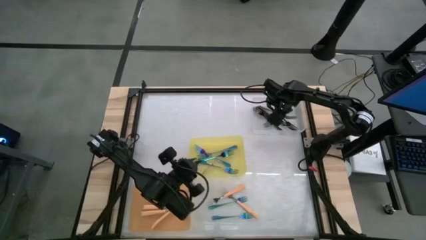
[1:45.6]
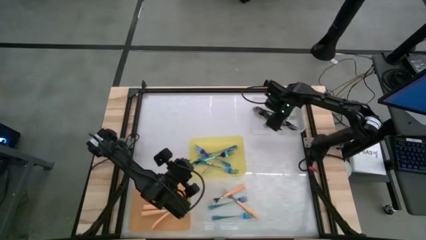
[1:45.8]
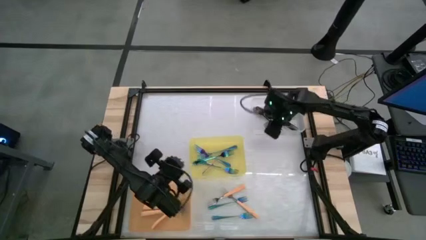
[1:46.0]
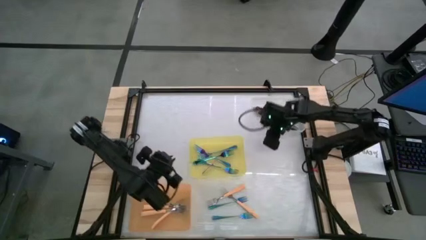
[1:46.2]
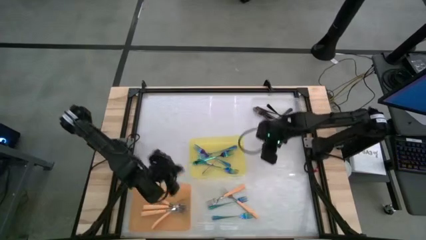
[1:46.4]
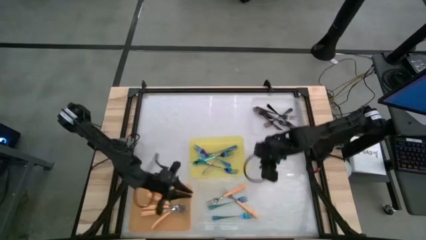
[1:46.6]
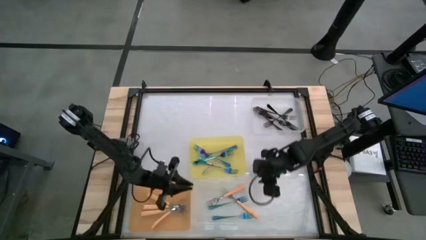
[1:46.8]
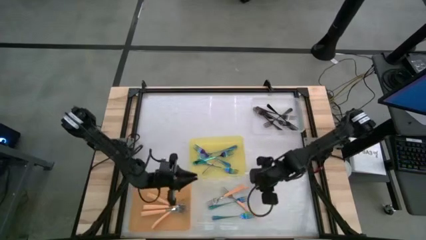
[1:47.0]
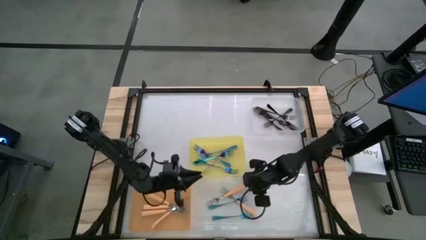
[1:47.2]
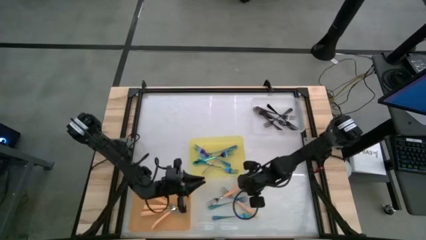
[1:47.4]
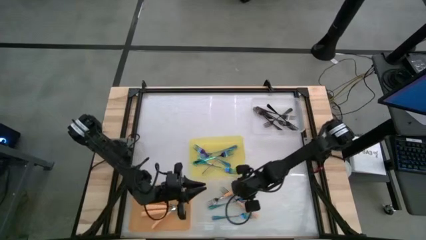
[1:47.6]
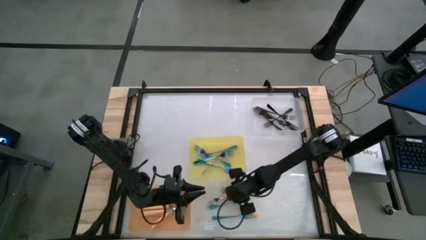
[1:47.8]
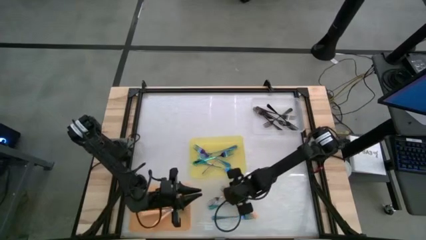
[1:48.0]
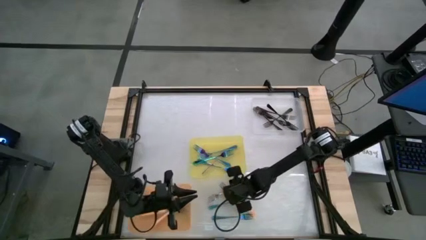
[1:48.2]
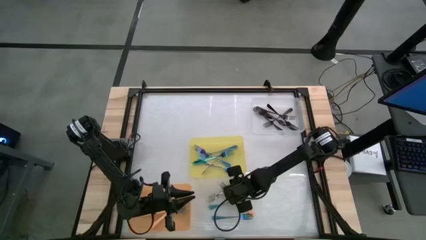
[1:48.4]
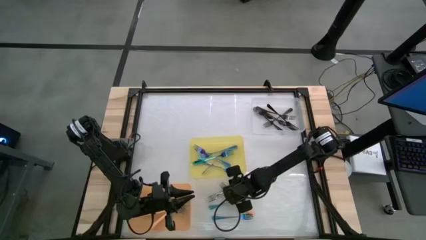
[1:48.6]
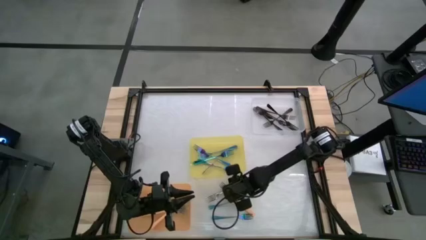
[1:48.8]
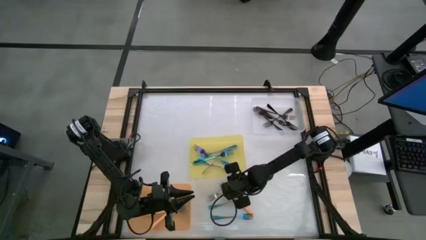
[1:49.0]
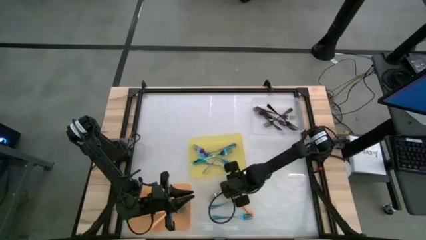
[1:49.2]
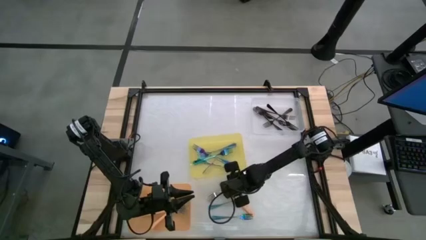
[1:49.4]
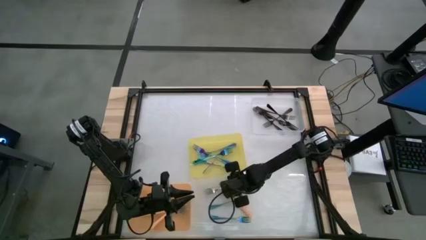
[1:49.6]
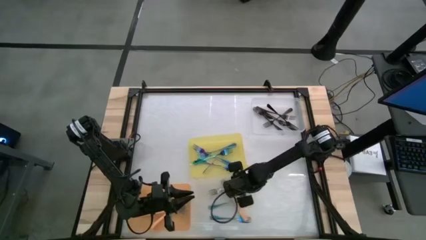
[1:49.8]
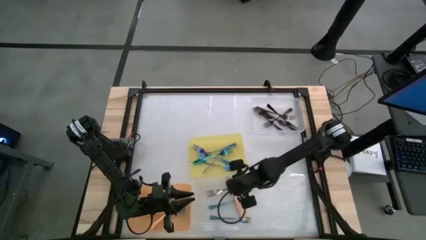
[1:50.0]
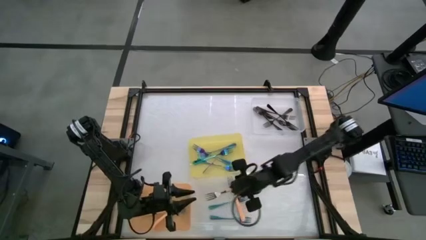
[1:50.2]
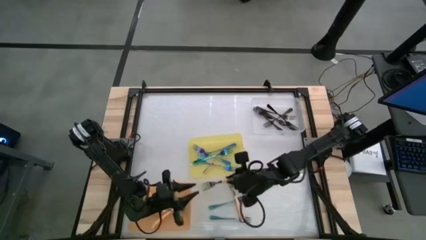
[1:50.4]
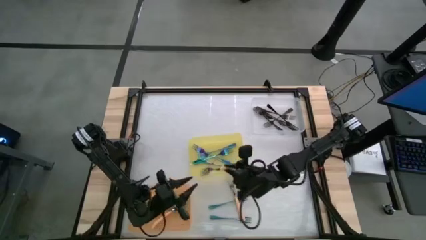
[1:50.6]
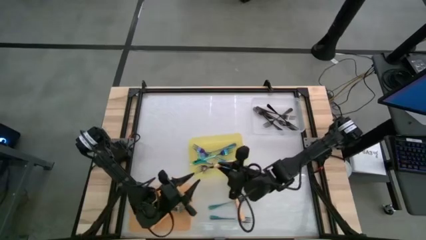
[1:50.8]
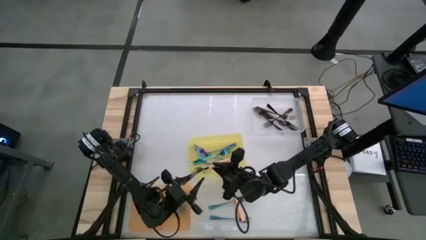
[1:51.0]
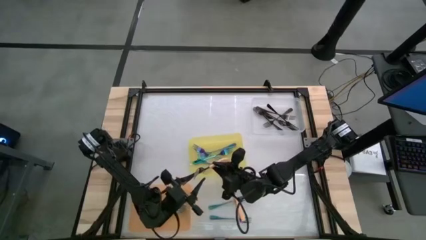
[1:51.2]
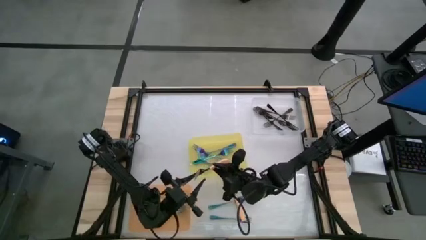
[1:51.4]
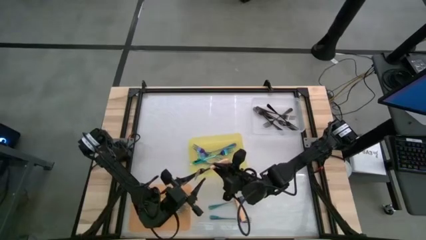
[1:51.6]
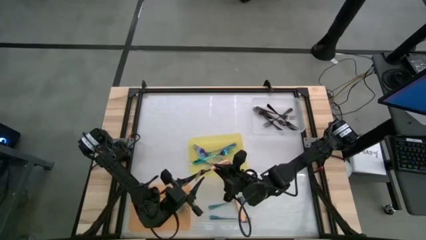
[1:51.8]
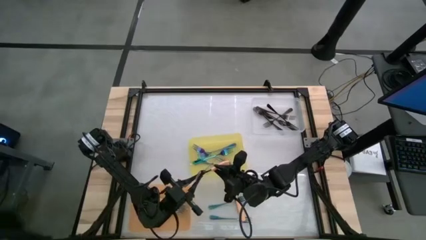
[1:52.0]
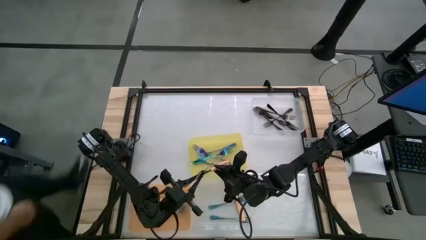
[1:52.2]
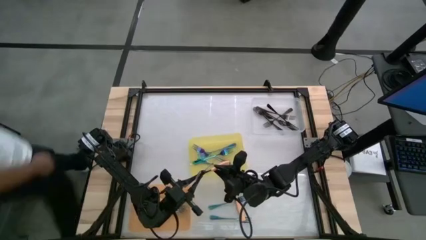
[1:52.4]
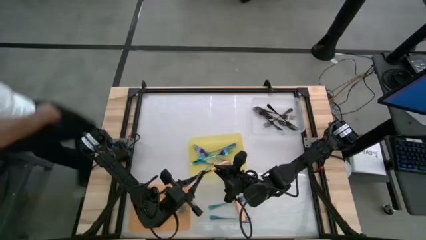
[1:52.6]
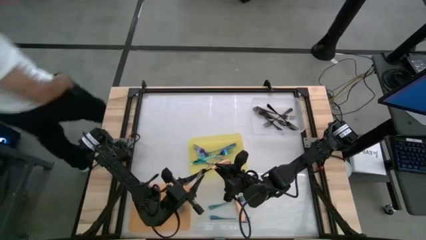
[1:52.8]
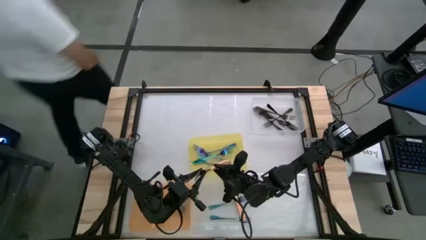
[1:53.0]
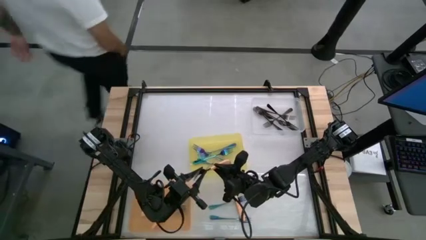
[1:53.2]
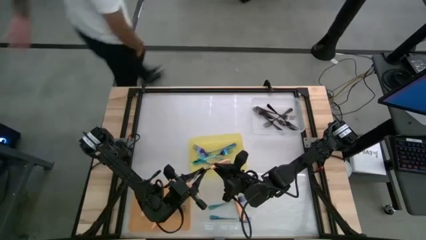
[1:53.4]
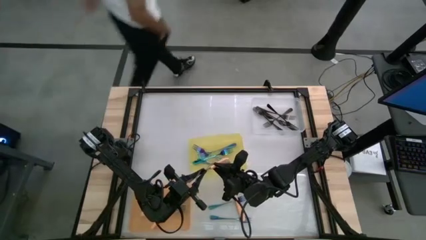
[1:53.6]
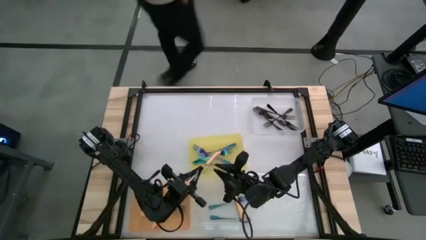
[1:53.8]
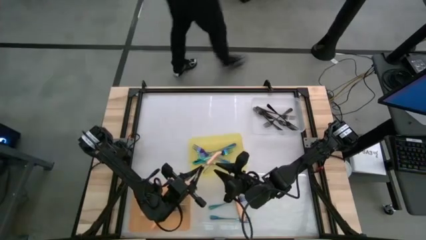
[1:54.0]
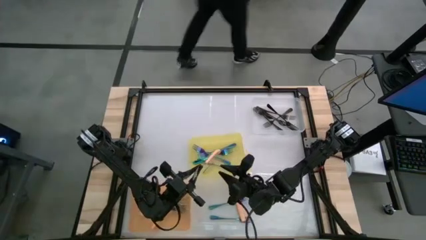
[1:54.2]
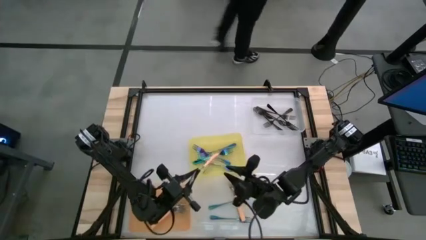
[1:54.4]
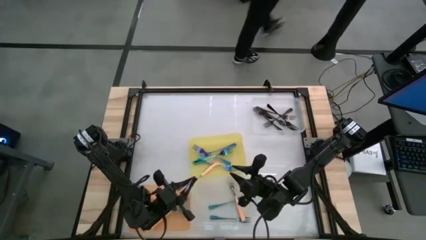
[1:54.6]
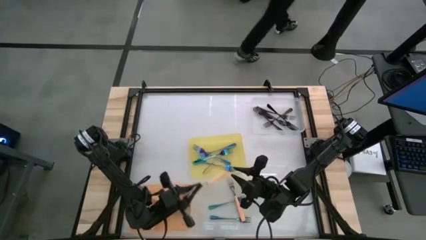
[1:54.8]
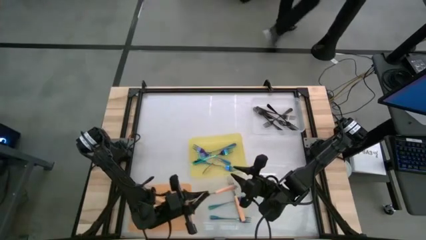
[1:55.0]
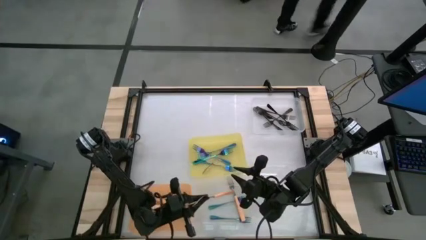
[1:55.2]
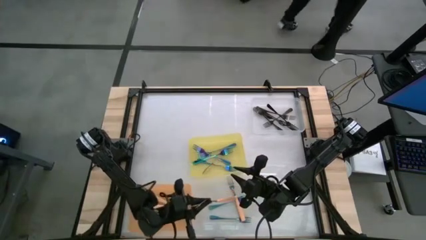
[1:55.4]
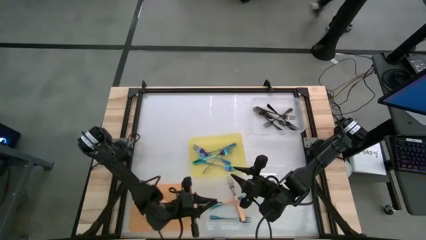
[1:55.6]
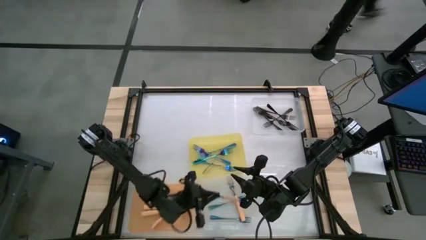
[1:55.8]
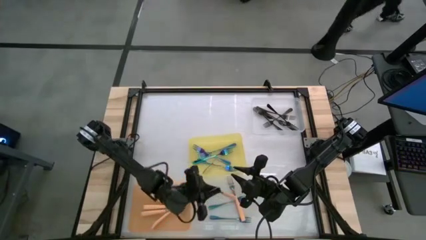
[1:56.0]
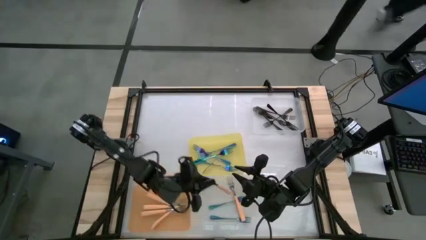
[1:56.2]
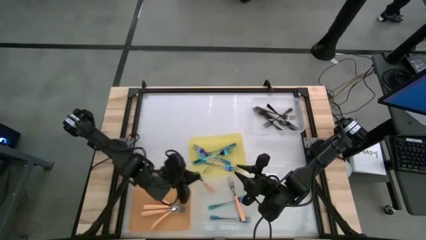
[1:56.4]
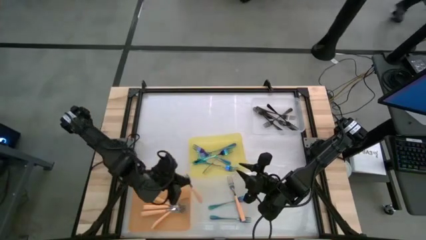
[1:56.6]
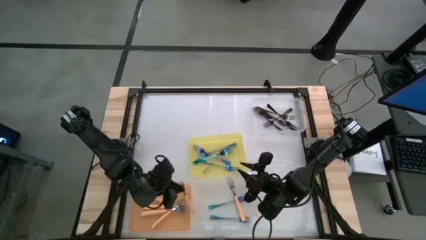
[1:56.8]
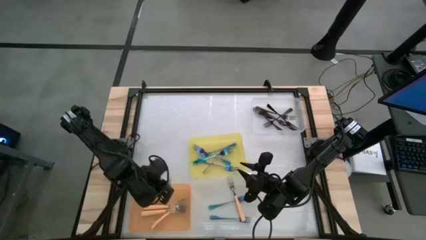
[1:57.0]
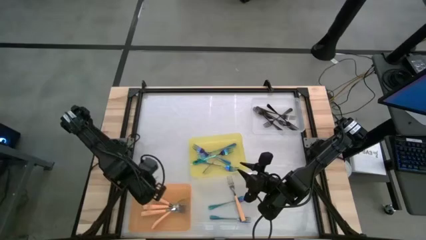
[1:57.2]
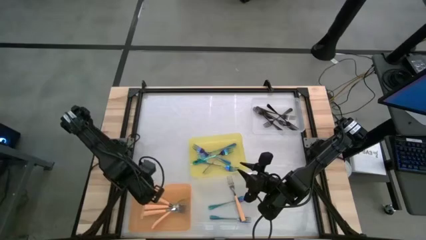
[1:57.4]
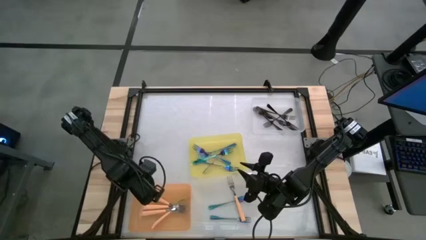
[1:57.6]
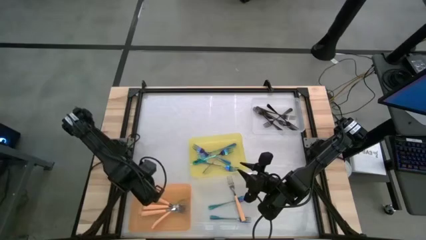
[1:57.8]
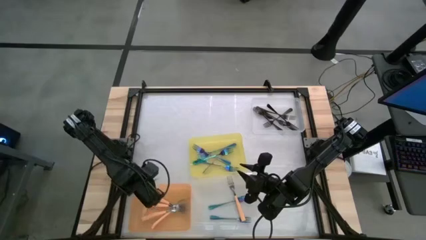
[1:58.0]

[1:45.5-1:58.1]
Task: Sort silverware by color (type)
Put the top orange fork into the orange bin

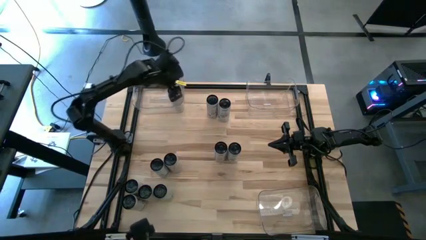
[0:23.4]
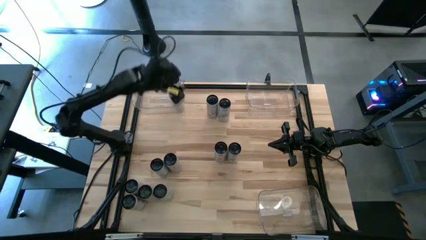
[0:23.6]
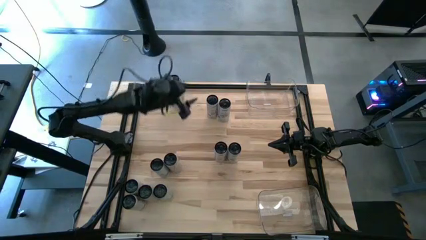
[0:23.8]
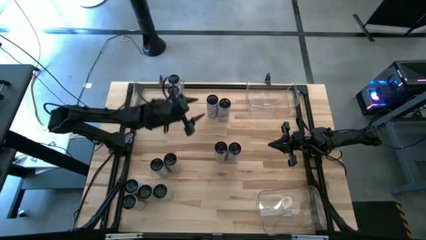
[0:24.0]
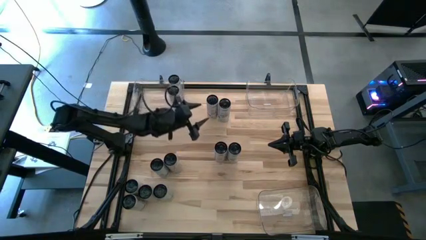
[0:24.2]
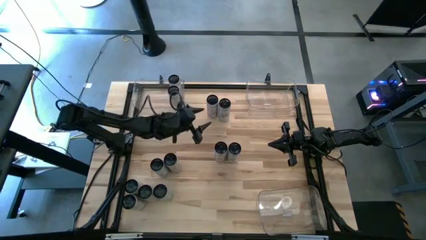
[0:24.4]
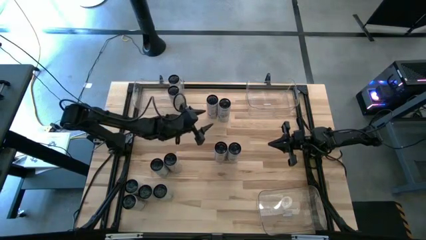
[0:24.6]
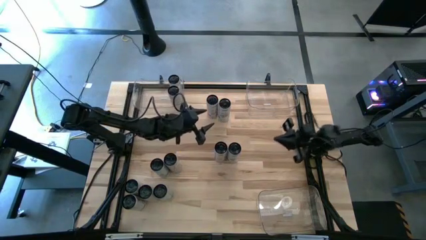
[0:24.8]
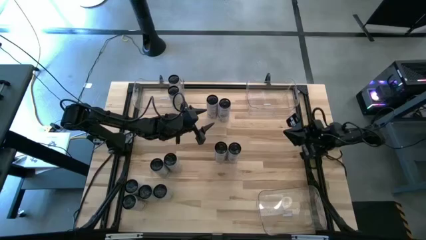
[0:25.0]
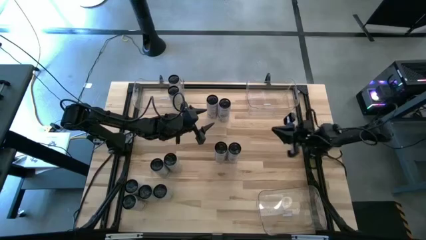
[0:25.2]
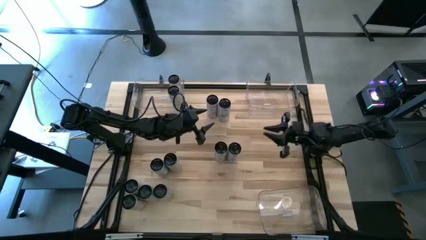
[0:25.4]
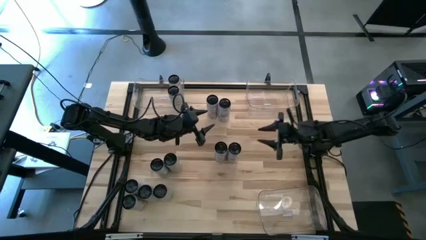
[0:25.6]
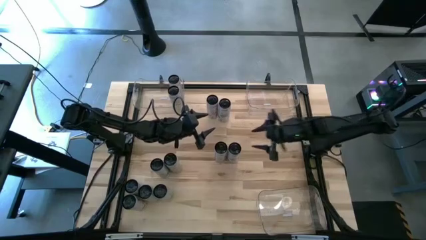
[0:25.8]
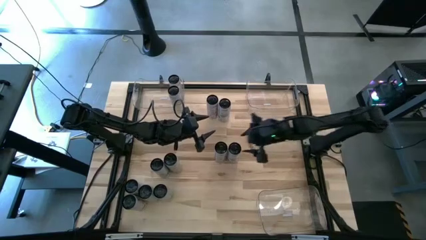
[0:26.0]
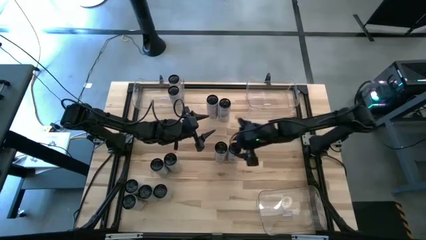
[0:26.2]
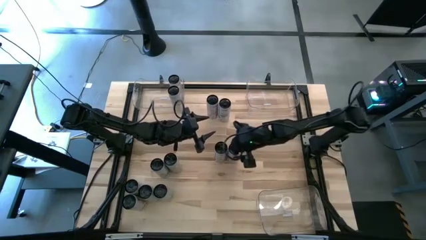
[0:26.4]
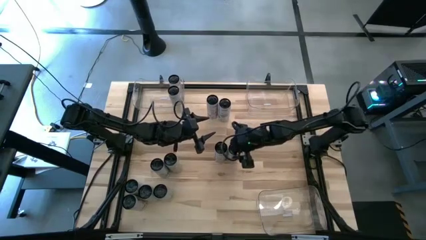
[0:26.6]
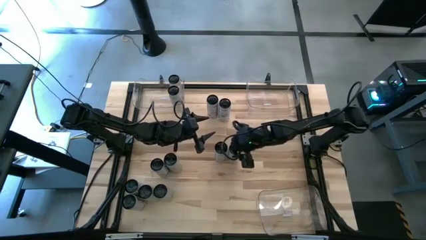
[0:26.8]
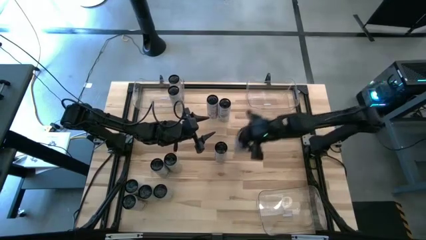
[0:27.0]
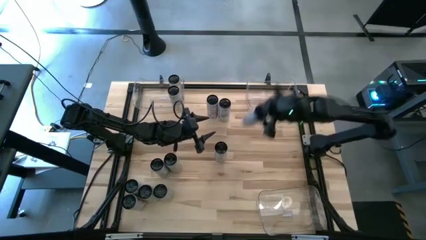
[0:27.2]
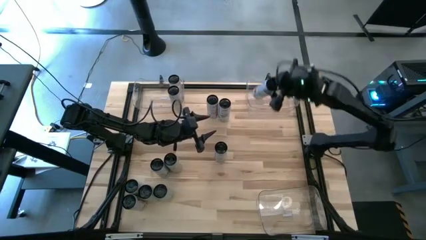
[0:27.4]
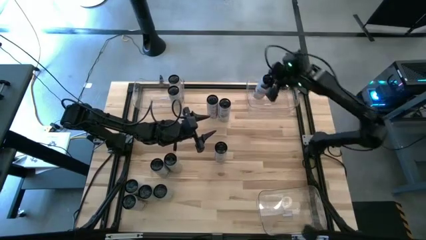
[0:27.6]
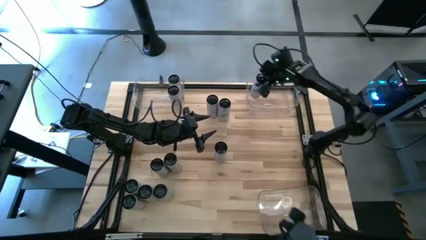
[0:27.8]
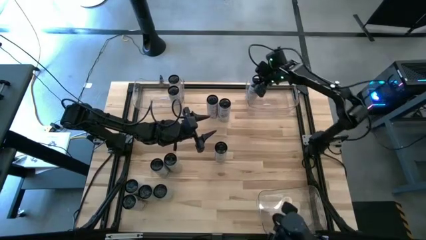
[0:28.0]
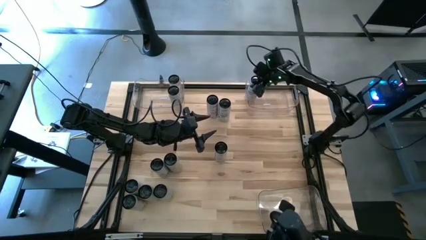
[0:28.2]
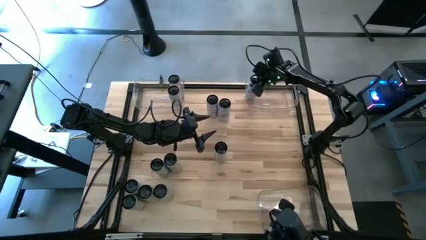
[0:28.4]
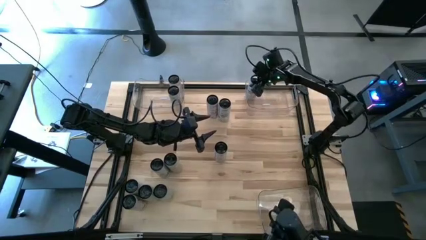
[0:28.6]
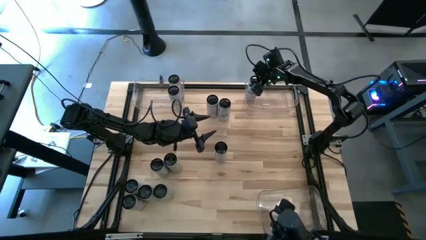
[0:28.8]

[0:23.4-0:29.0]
Task: Sort soda cans
Put the white-blue soda can into the top right transparent bin
